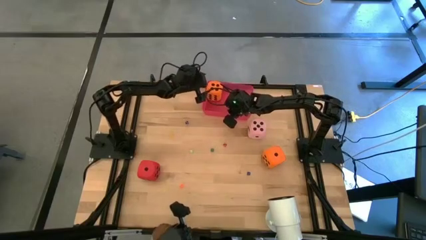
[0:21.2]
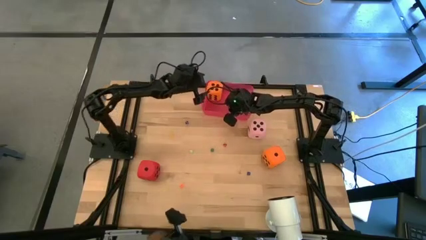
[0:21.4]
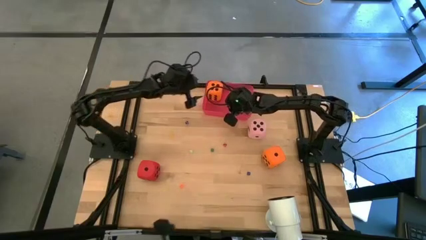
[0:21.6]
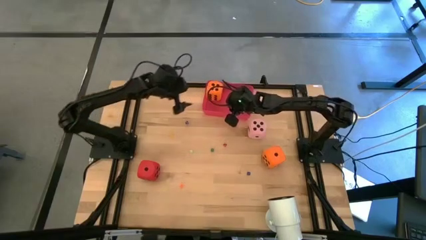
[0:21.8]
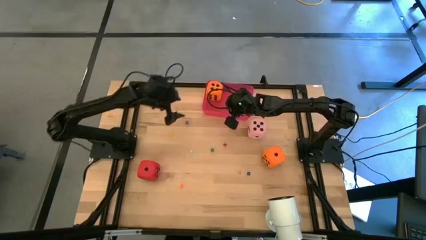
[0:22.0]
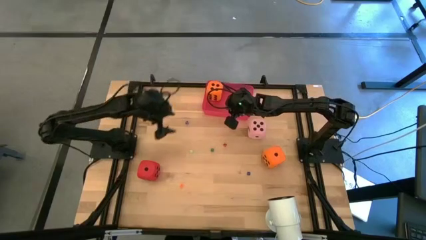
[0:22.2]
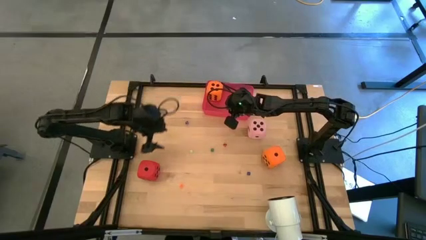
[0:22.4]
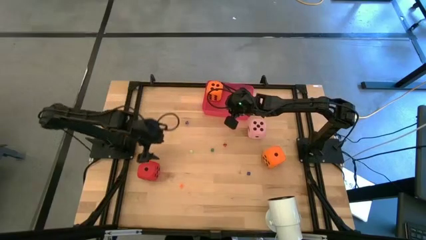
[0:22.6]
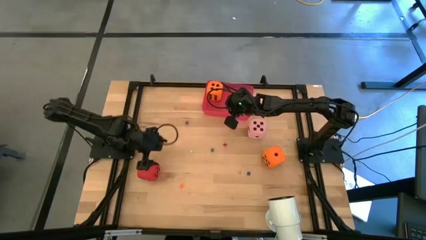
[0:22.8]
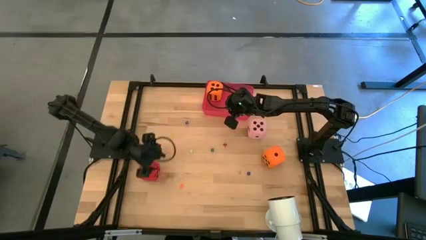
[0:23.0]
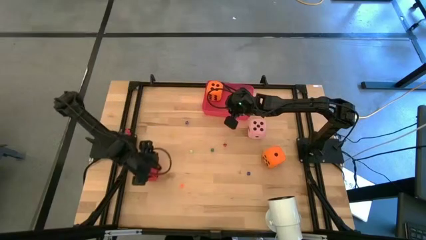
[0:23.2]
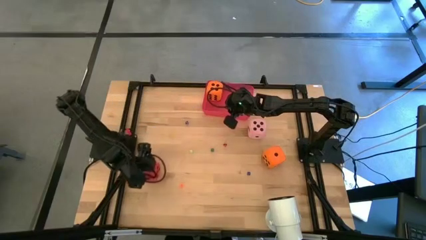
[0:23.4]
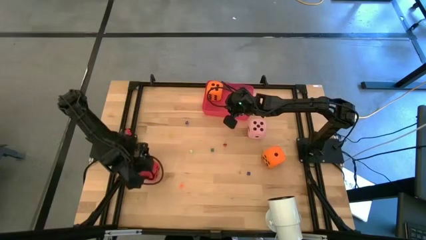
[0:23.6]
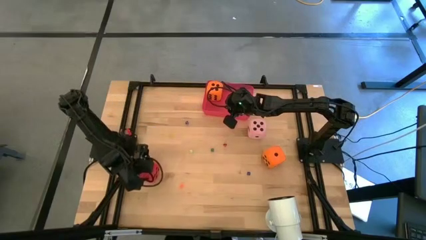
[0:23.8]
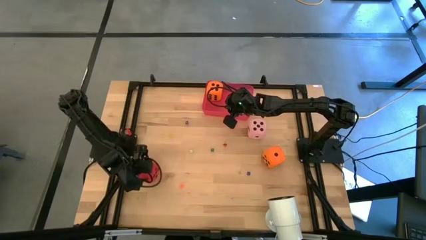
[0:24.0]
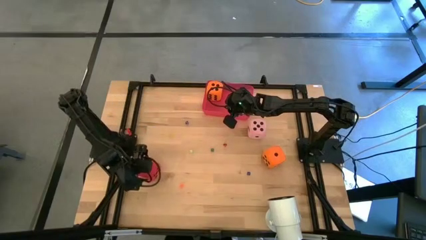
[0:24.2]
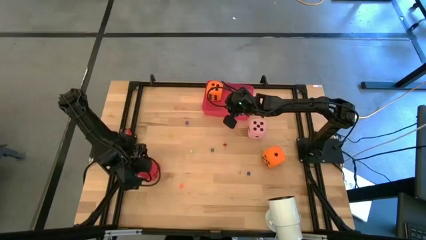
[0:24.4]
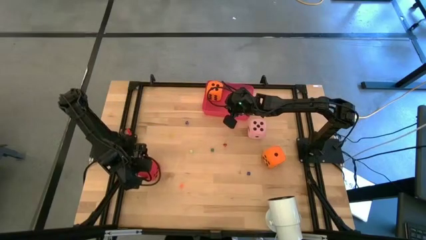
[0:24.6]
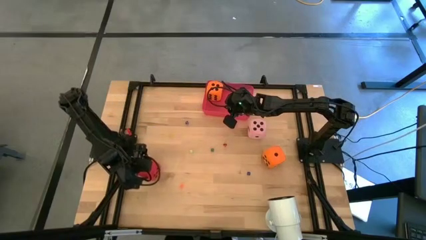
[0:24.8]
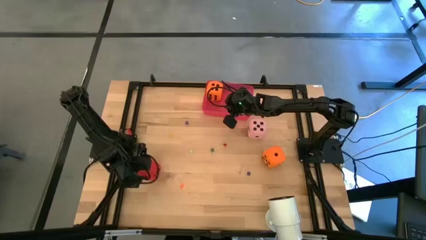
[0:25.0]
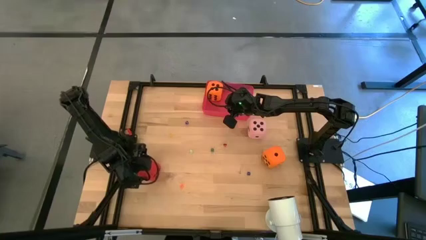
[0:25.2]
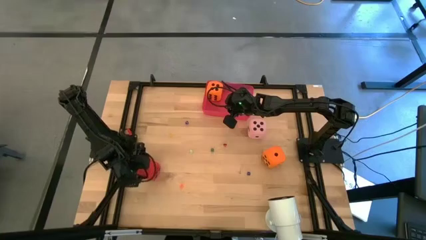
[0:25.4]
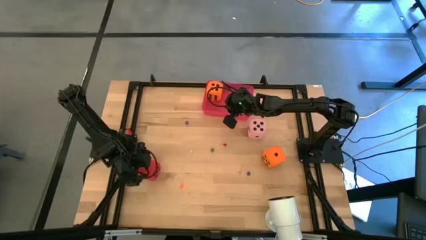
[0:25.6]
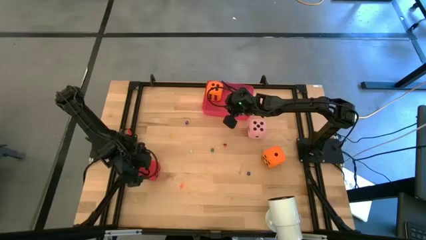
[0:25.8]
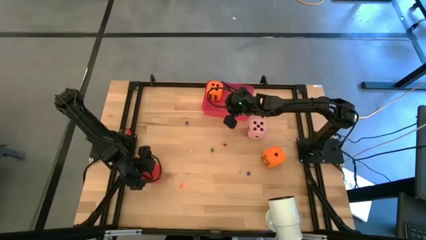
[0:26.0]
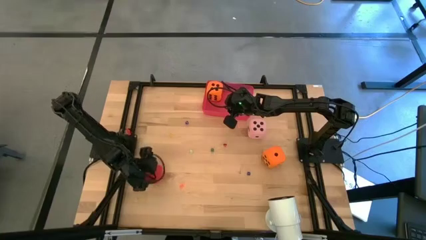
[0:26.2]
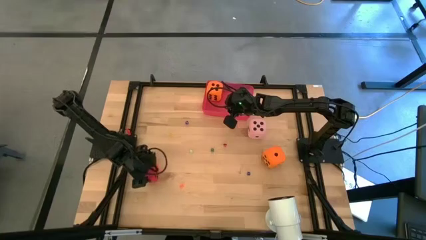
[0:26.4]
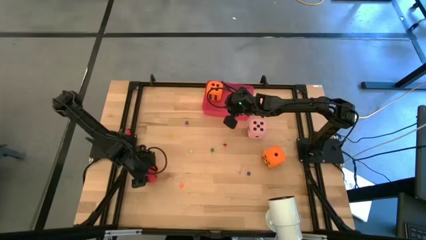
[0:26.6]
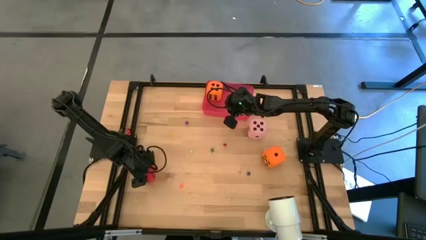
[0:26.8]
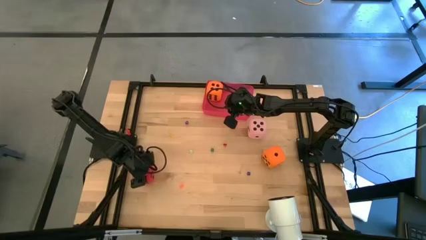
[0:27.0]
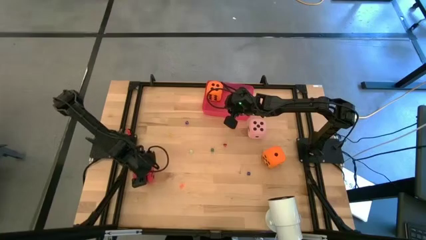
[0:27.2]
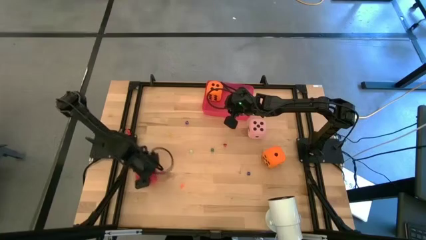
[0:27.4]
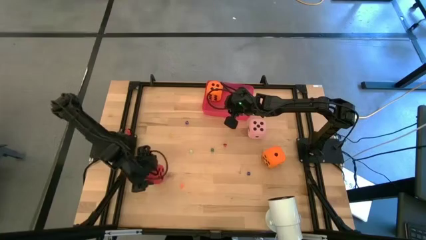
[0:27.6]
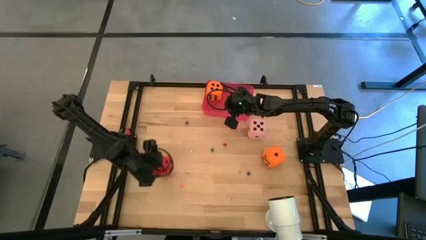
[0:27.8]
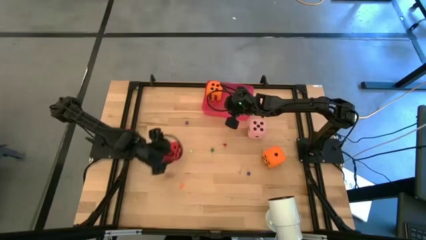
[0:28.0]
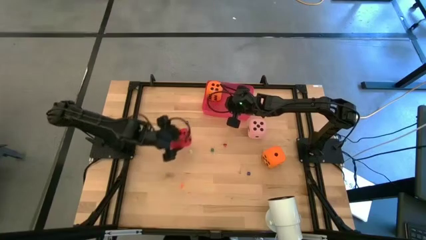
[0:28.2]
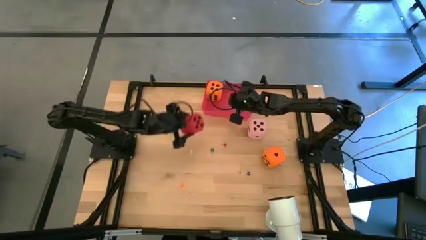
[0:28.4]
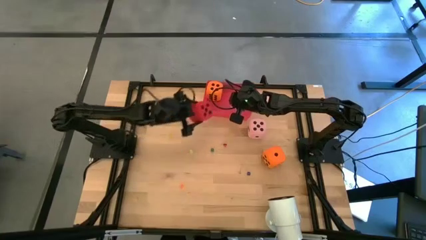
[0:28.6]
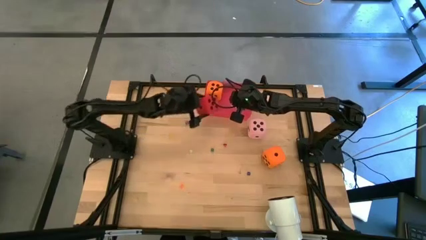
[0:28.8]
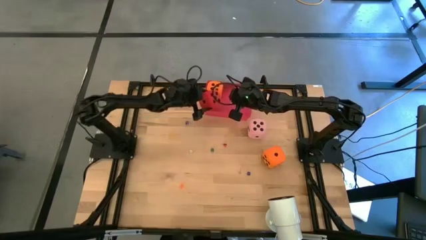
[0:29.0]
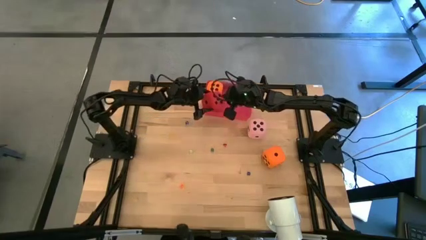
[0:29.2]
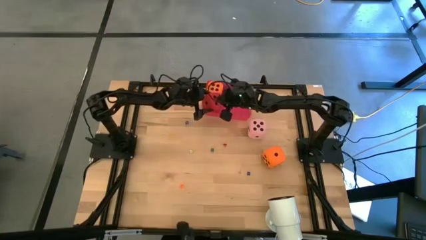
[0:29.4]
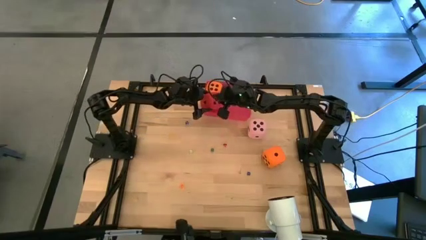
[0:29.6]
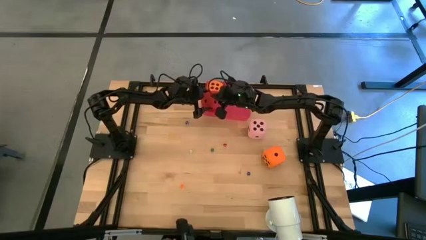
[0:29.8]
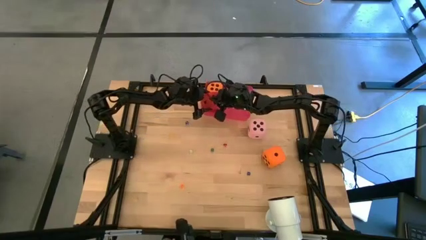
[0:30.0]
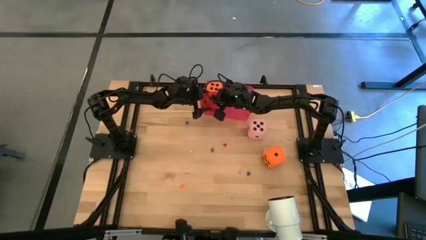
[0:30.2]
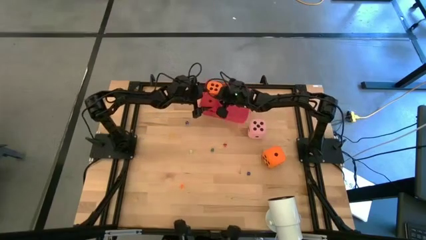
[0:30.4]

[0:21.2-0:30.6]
Task: Pick & Place Dice
Put the large red die into the red bin

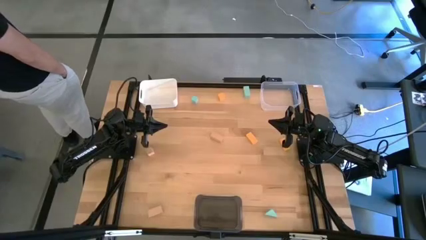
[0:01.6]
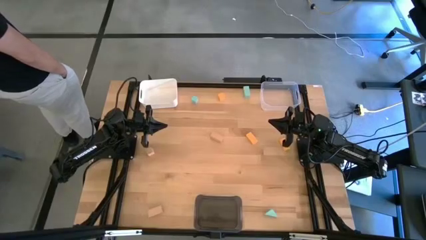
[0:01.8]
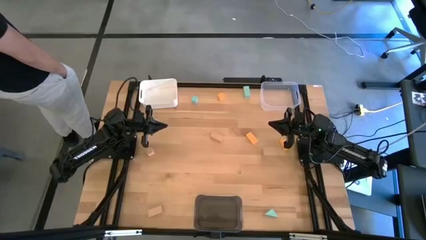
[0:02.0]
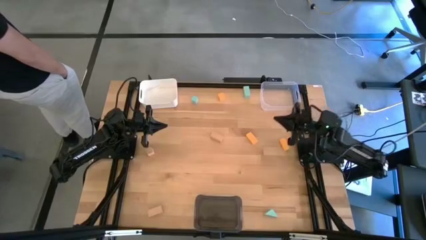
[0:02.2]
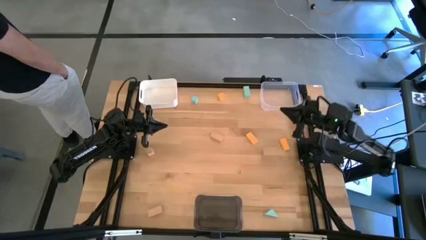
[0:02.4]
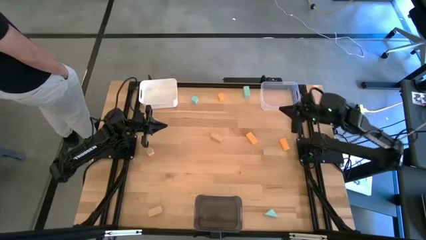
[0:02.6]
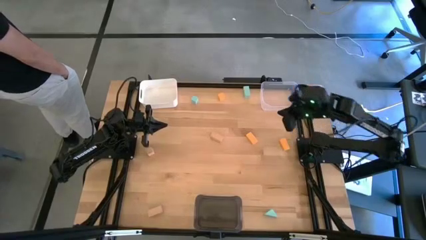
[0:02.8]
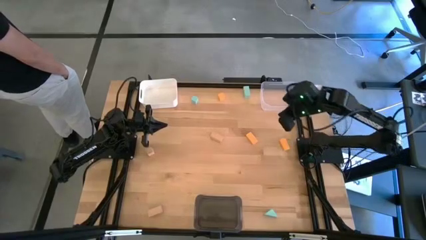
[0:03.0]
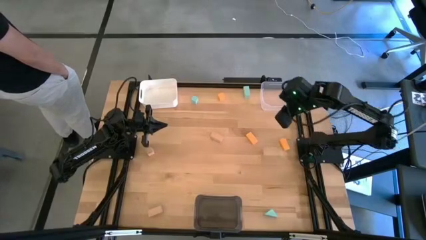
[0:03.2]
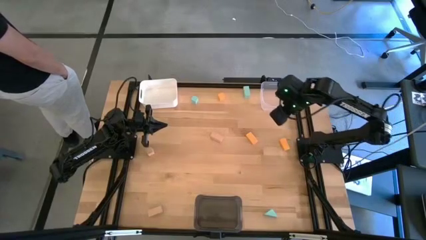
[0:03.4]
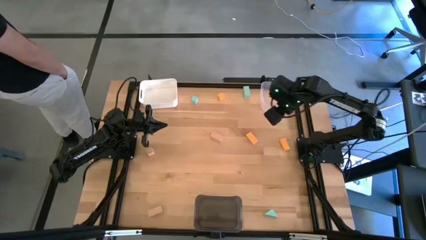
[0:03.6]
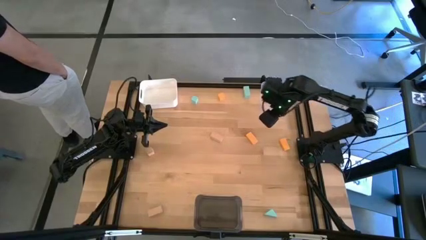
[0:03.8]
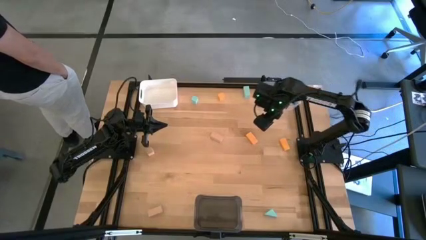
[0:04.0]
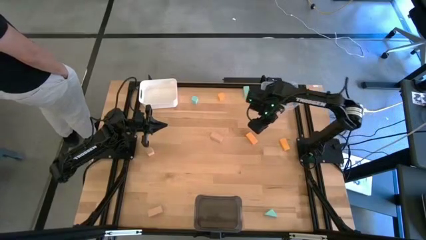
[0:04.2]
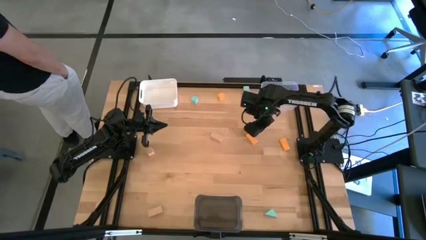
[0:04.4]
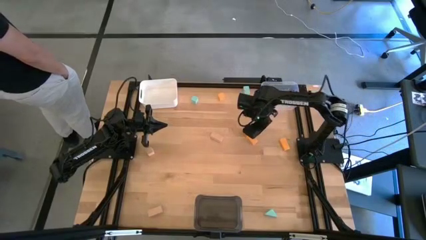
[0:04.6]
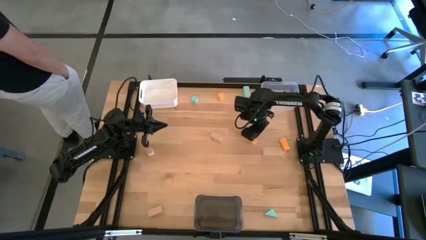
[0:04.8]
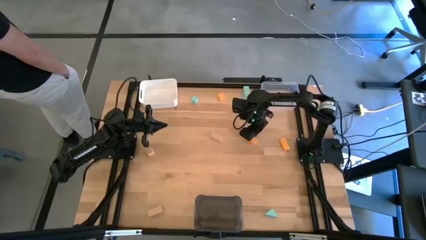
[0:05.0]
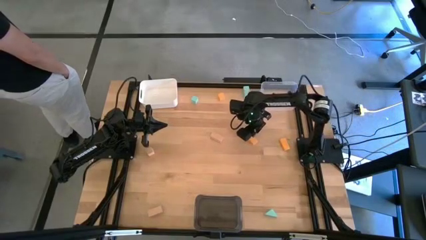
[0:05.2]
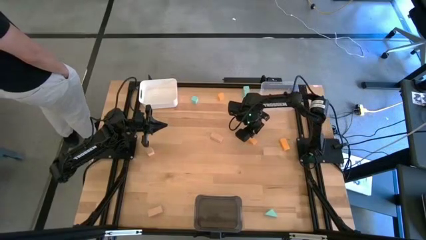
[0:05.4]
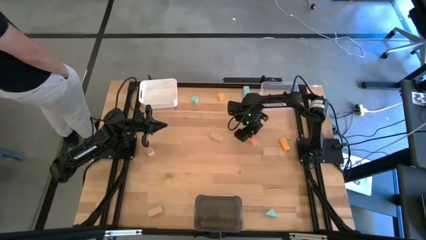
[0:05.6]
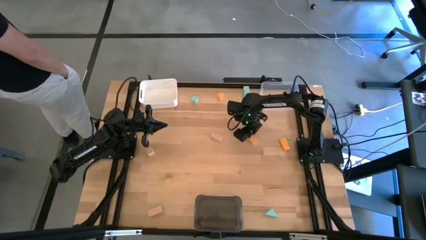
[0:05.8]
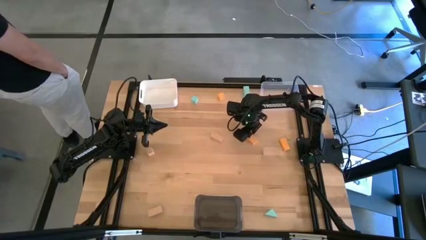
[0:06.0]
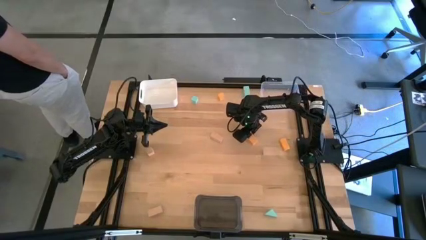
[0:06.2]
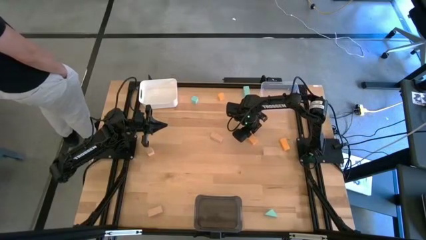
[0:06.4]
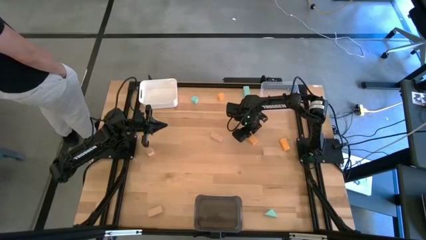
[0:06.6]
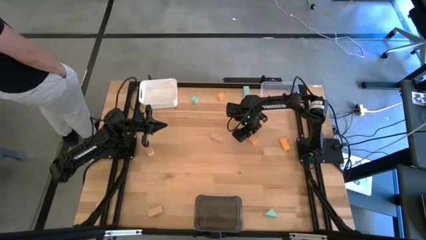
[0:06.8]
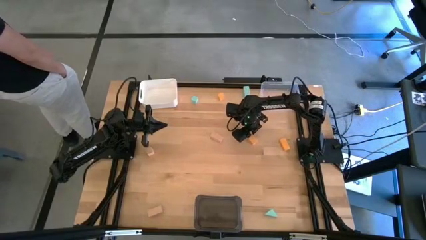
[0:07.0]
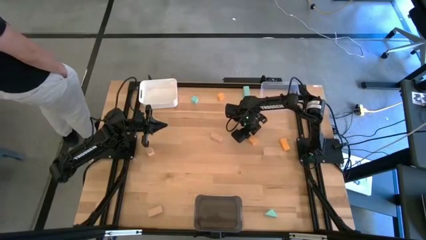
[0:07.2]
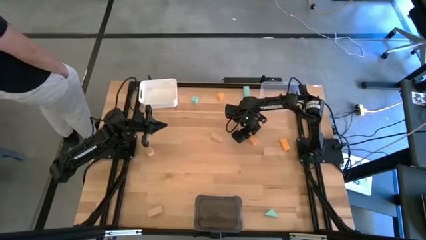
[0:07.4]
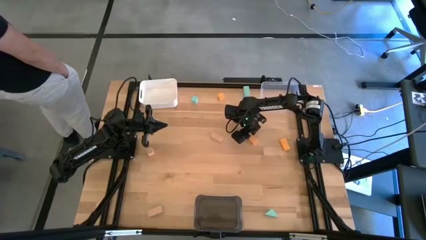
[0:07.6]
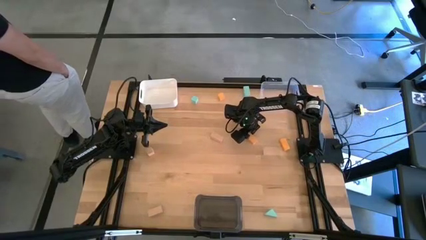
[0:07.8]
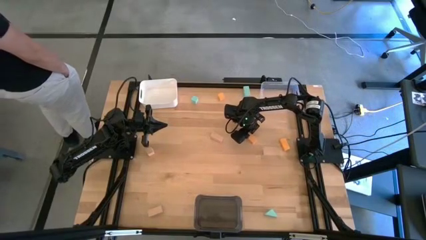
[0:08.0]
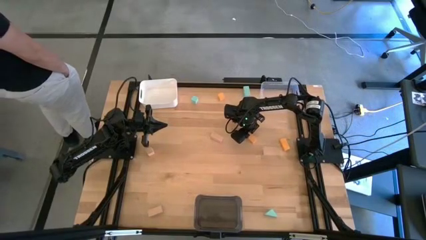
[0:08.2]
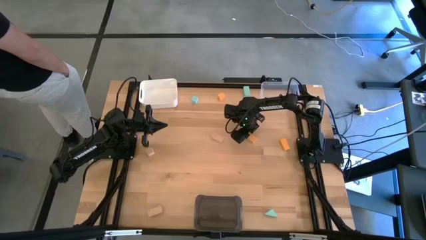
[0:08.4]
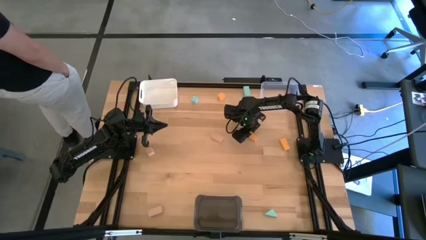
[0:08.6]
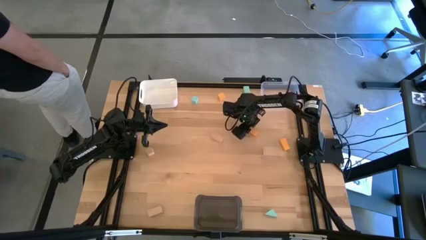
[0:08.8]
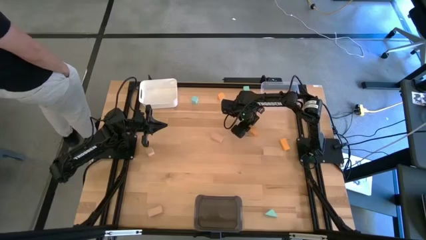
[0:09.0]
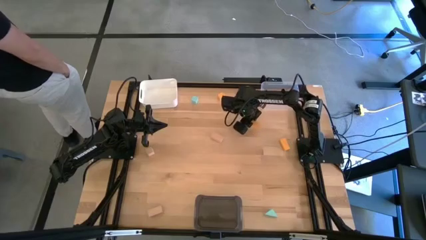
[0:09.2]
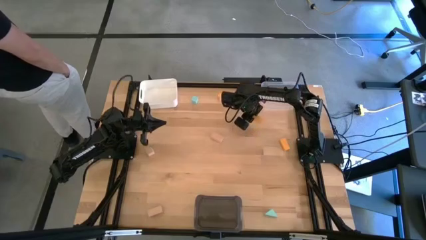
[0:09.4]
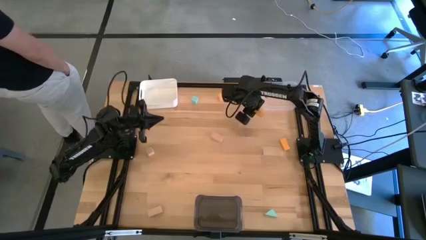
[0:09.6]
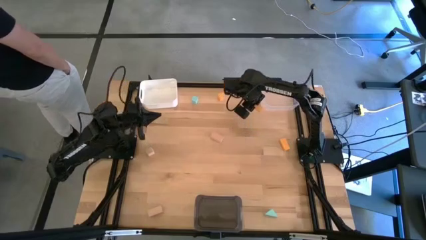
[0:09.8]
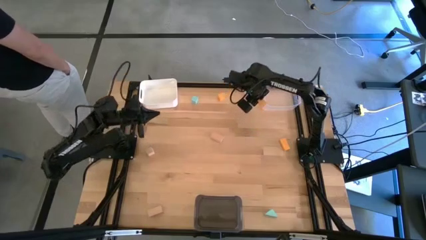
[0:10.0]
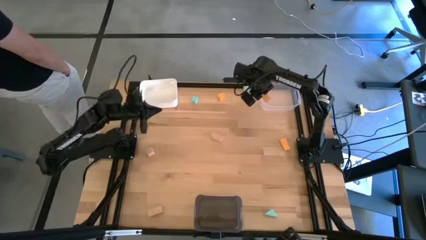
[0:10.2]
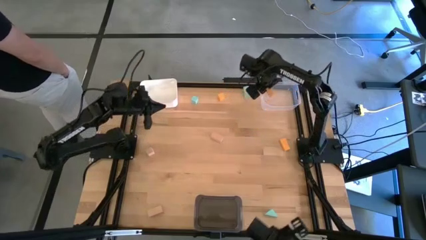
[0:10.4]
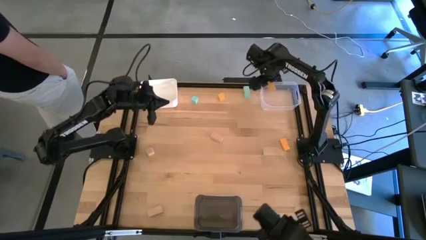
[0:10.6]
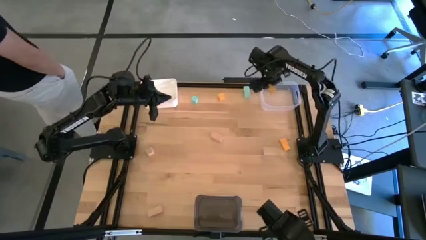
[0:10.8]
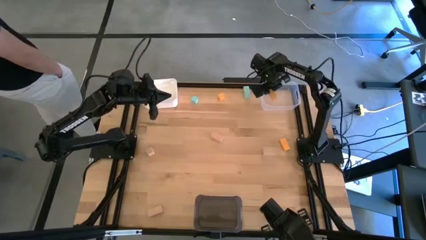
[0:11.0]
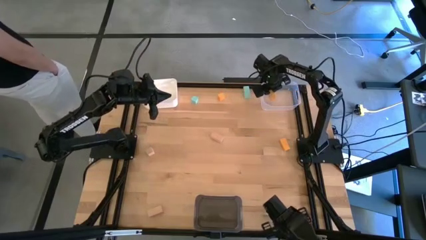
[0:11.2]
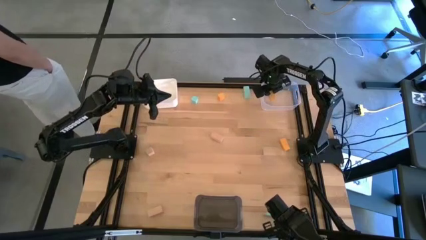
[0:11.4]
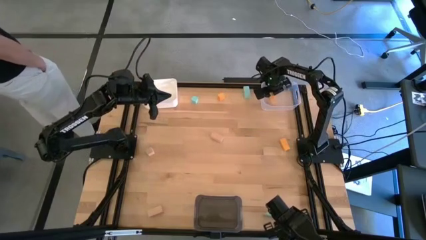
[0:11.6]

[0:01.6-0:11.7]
Task: Sort & place blocks by color
Put the bottom left yellow block into the transparent bin
